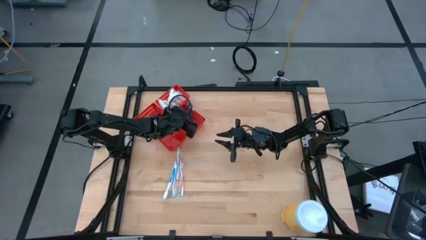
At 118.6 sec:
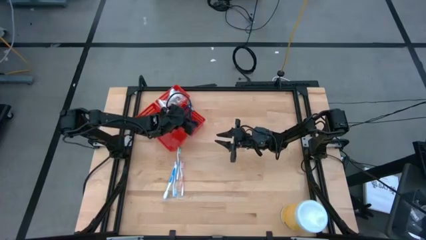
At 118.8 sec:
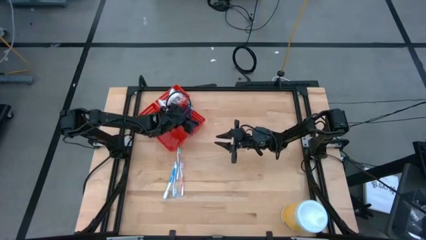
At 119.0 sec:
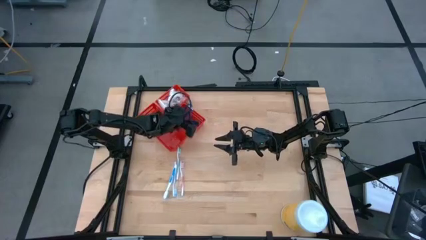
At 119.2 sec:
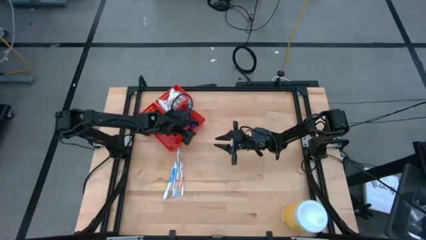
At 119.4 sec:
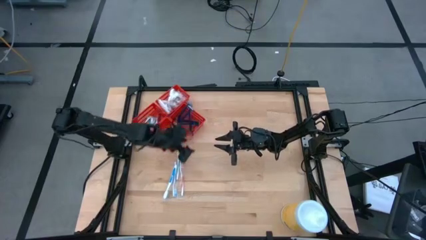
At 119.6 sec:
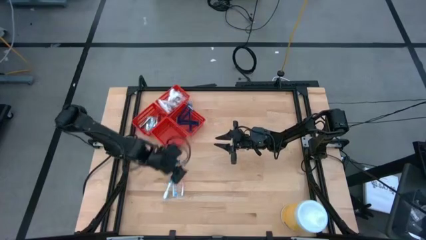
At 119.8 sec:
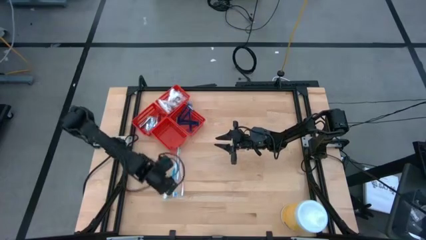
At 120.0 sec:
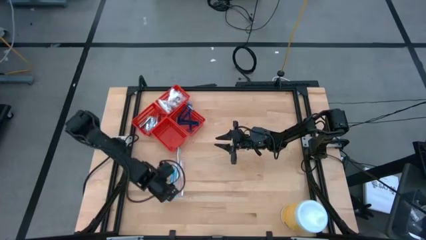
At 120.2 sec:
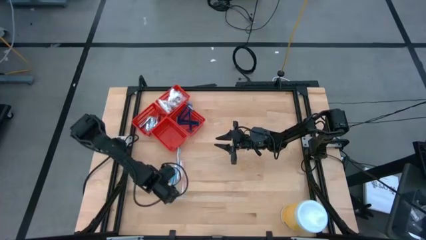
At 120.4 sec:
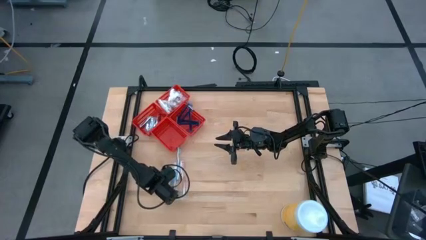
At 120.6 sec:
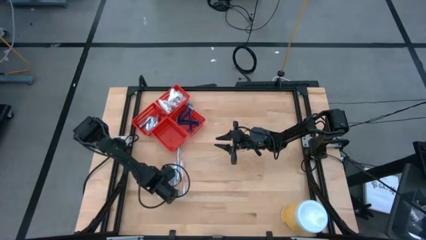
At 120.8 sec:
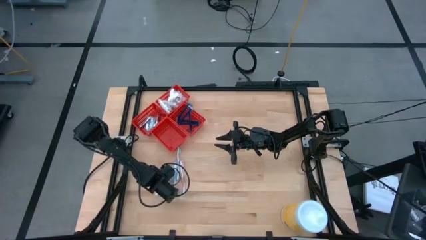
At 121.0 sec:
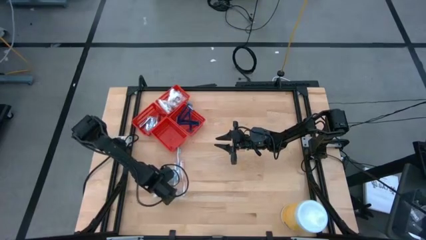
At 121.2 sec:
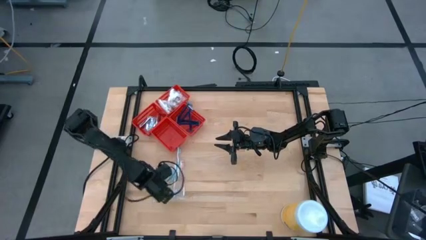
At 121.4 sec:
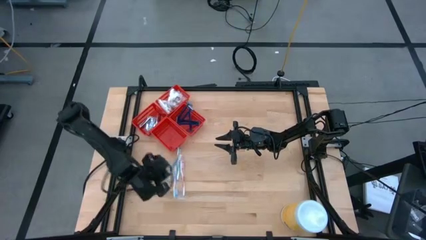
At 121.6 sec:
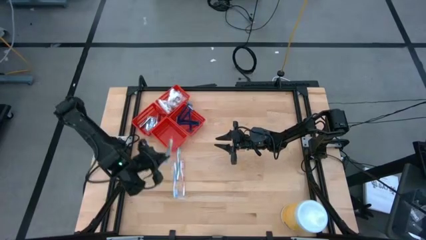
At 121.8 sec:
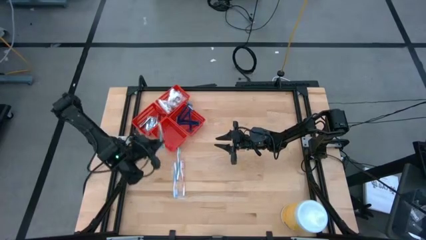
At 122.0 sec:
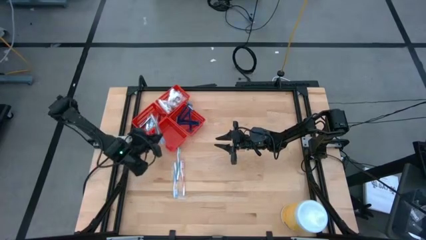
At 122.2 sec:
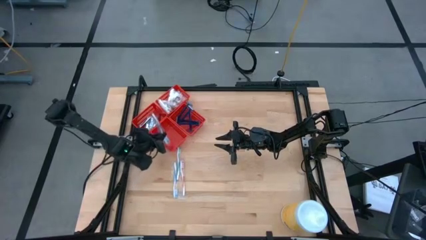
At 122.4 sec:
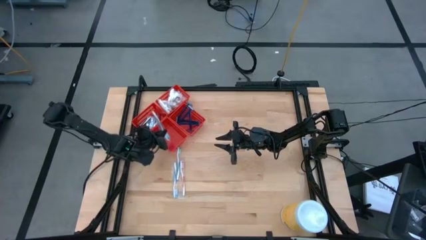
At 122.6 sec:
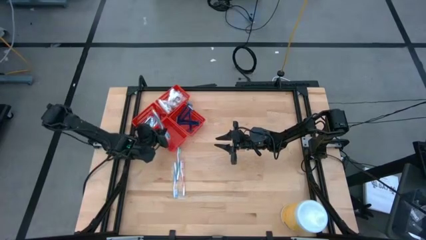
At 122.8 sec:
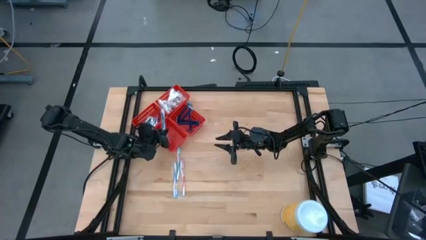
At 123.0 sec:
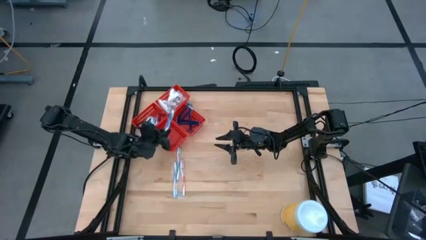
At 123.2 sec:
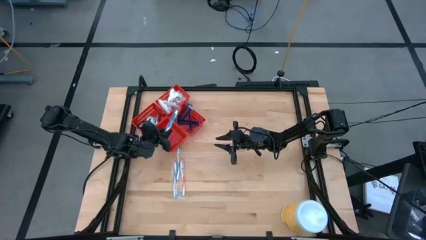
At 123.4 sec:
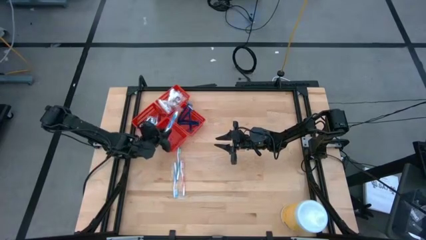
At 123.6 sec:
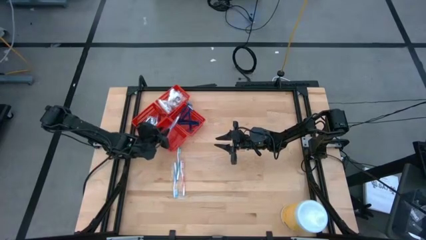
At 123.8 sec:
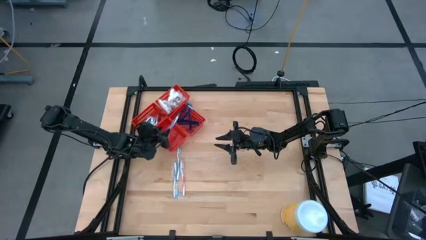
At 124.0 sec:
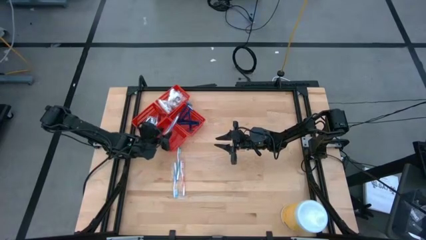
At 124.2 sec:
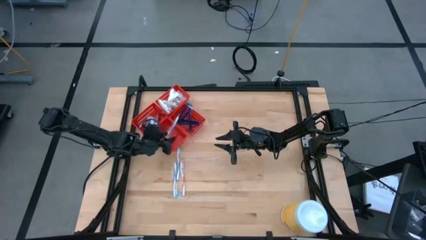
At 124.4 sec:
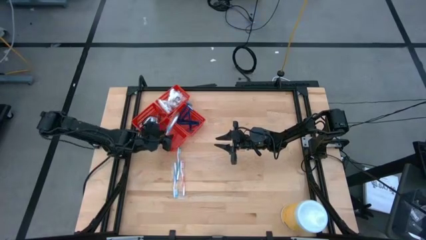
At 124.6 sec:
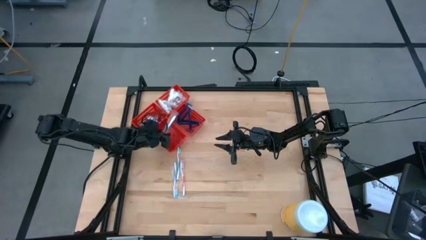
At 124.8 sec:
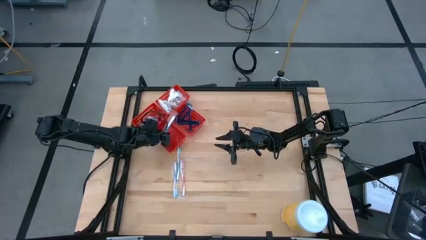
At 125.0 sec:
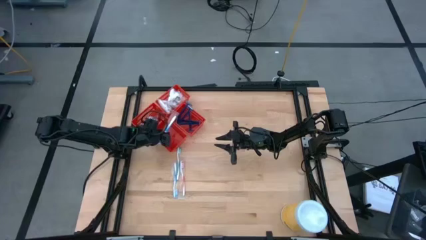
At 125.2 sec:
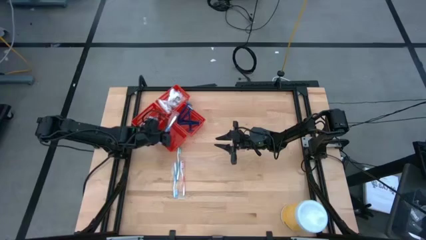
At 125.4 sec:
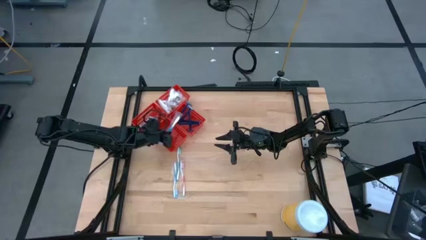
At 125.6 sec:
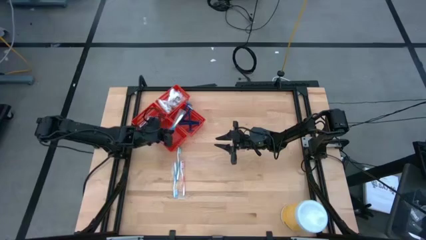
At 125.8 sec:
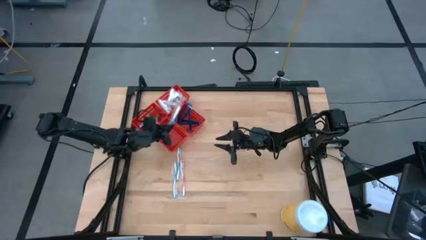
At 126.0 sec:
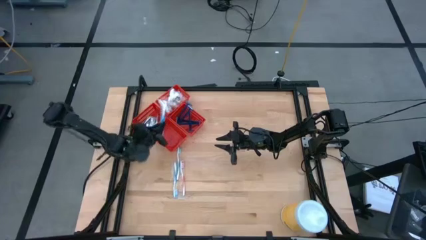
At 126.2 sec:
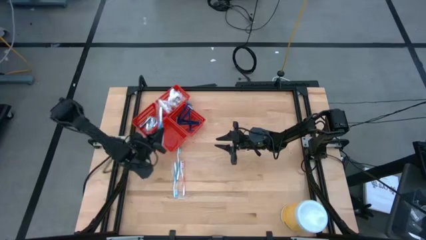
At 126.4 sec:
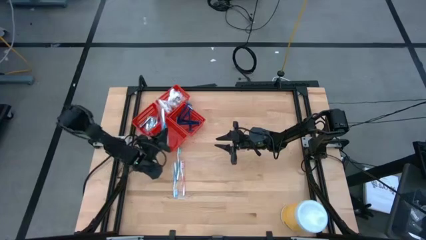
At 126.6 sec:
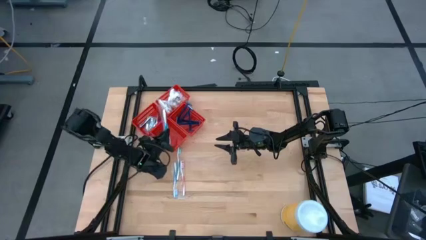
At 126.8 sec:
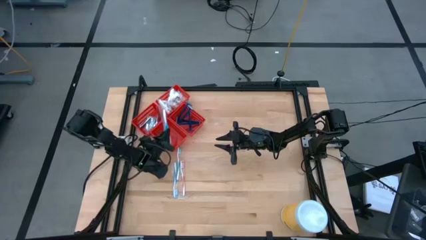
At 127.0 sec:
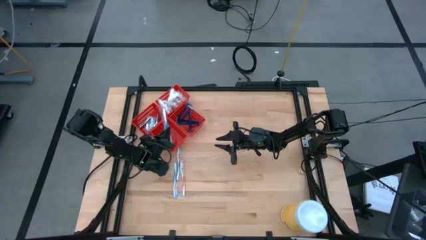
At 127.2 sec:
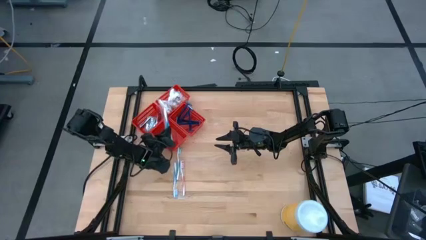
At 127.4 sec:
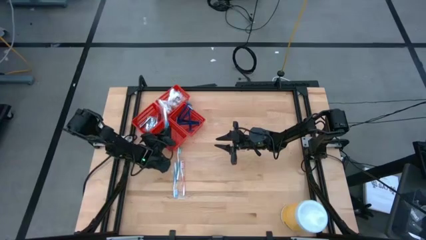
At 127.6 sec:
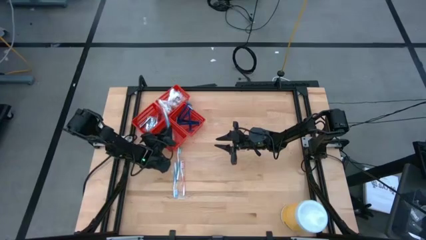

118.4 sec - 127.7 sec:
Task: Pick & Place Travel size toiletries
Put the left blue toothbrush into the vertical left red bin

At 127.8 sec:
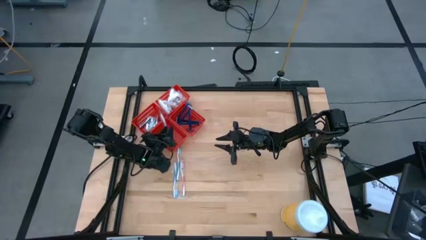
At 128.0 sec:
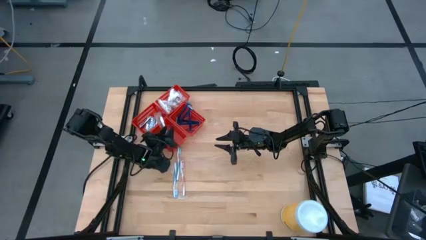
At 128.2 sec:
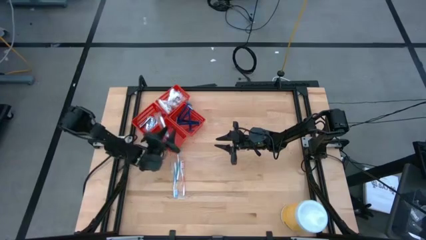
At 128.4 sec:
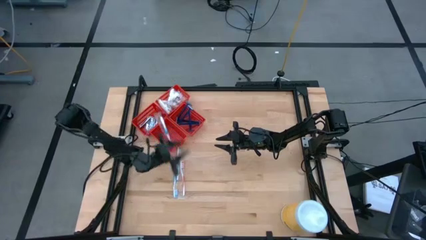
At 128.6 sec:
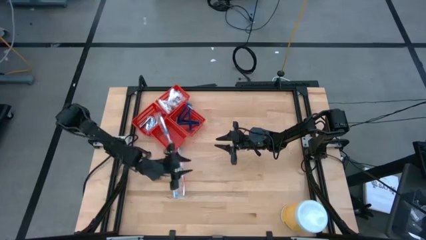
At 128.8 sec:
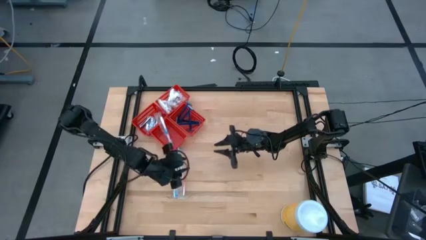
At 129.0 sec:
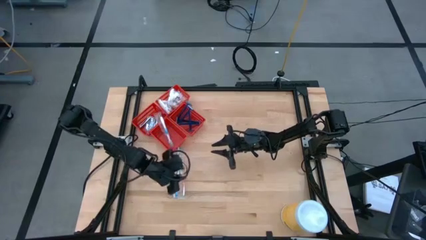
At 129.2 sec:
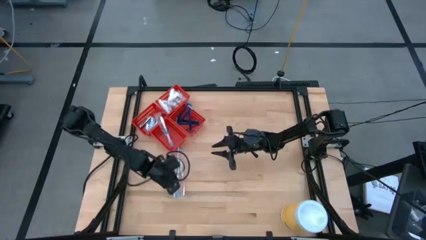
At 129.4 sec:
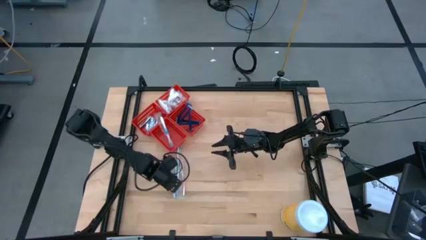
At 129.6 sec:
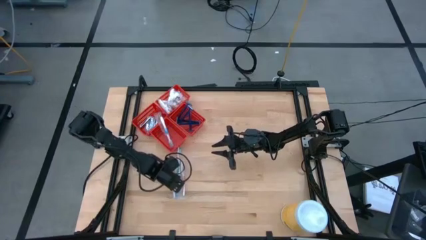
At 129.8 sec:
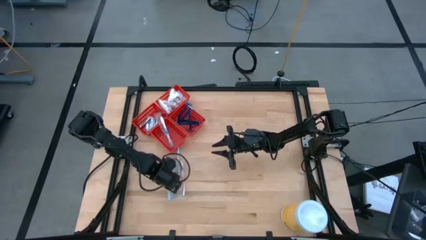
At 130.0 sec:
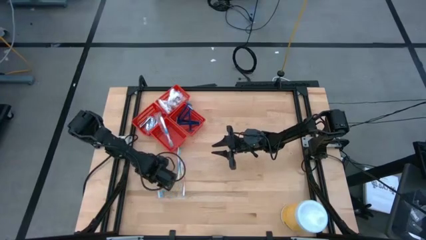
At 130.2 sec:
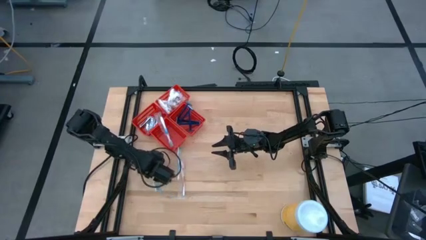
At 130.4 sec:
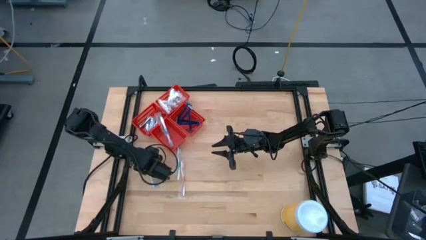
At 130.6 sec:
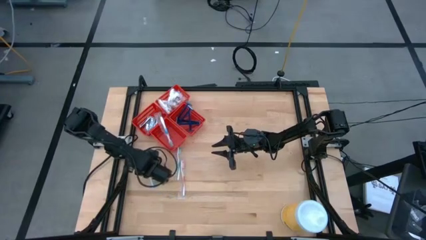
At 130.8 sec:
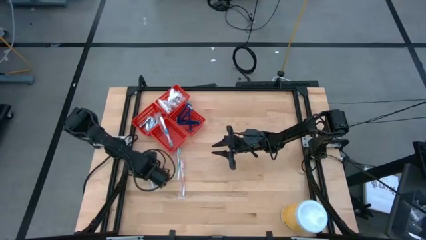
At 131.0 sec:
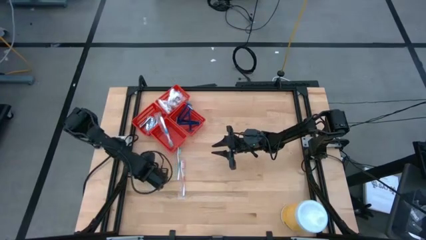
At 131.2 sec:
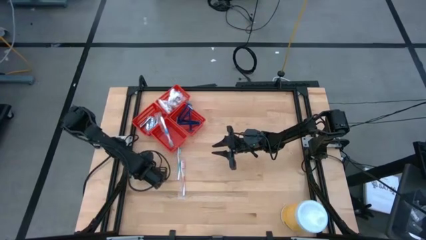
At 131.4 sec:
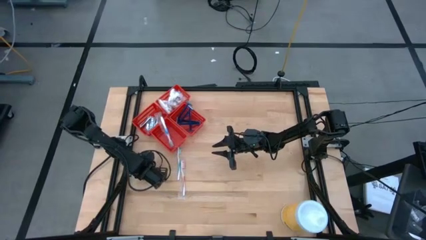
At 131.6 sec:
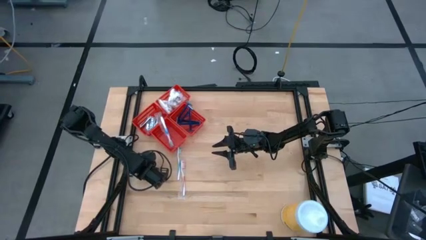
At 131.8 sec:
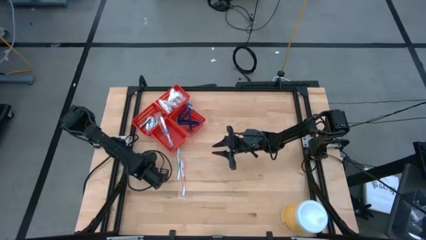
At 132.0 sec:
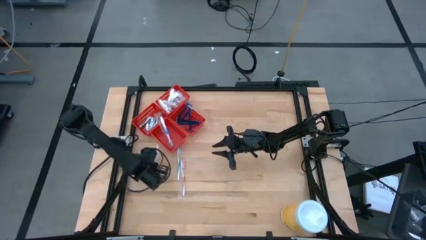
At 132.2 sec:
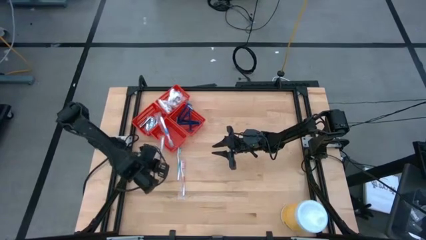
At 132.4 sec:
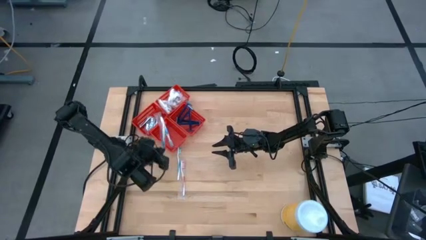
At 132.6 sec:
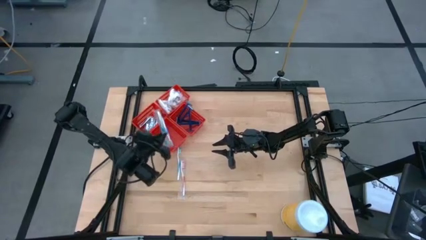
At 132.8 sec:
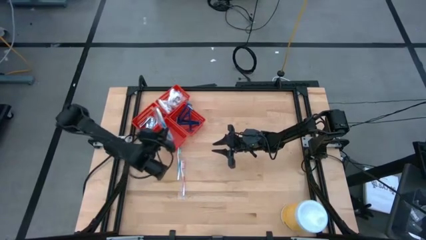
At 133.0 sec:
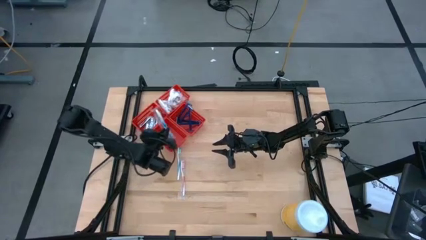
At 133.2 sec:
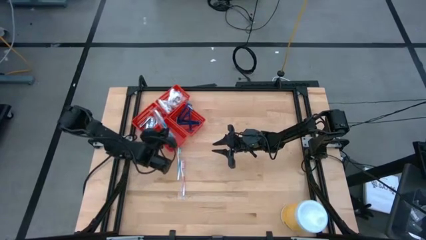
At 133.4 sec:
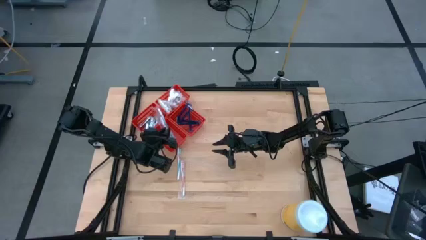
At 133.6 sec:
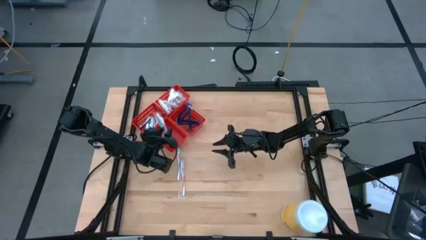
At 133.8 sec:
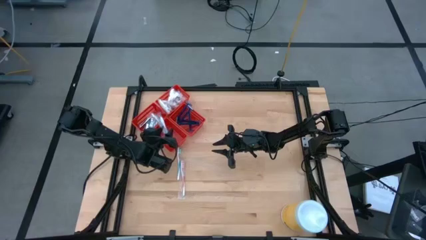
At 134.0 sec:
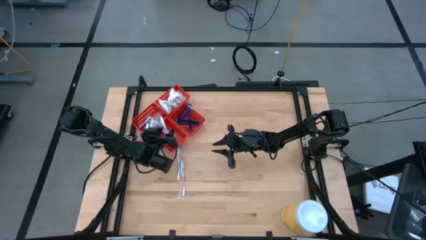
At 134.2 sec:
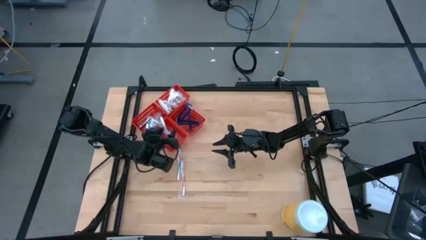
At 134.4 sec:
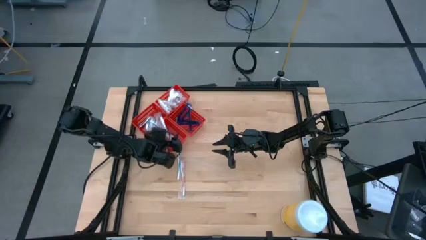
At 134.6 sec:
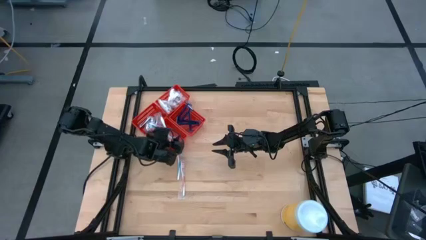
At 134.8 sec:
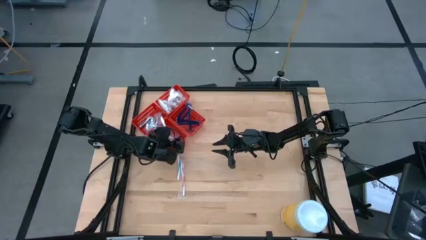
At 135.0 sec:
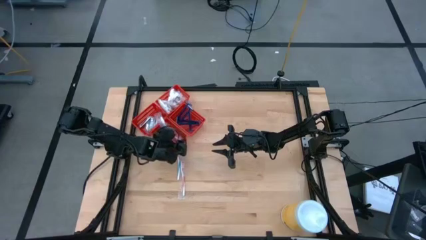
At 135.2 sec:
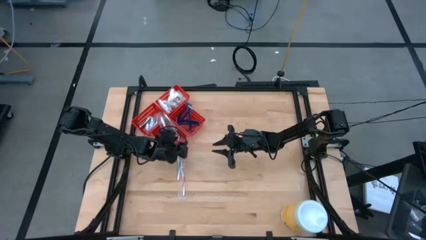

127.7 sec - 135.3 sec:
Put the blue toothbrush into the vertical left red bin
